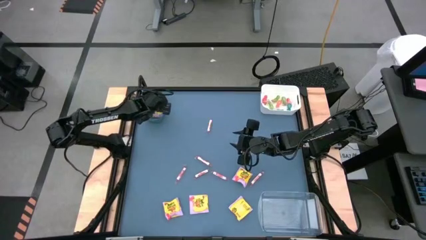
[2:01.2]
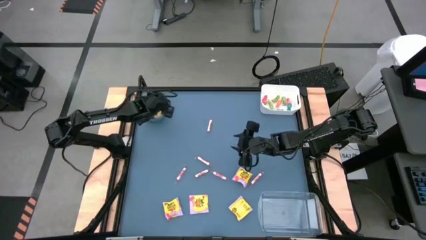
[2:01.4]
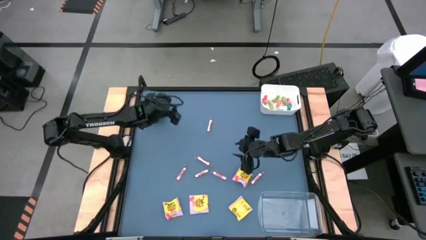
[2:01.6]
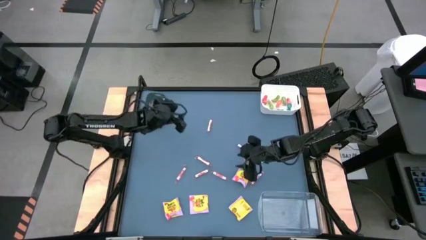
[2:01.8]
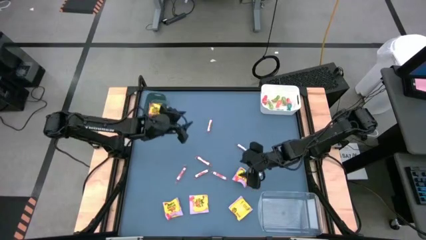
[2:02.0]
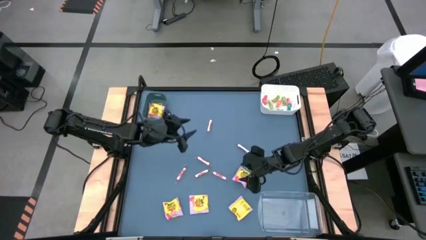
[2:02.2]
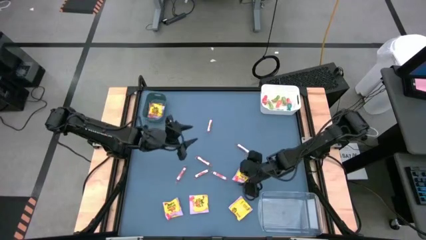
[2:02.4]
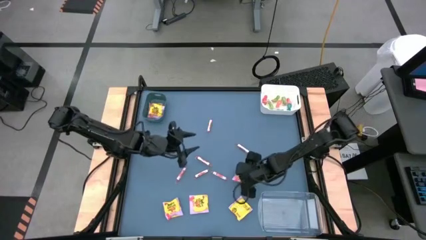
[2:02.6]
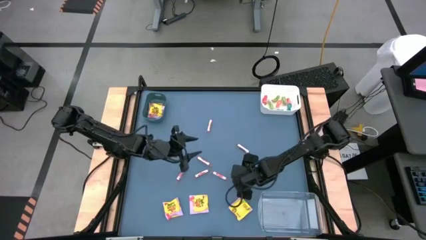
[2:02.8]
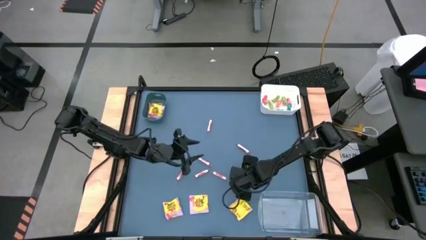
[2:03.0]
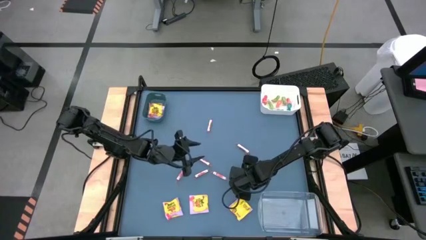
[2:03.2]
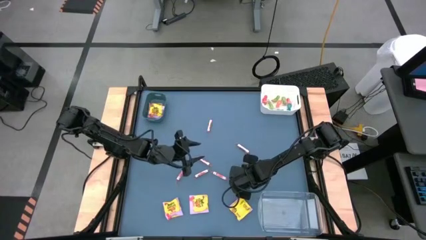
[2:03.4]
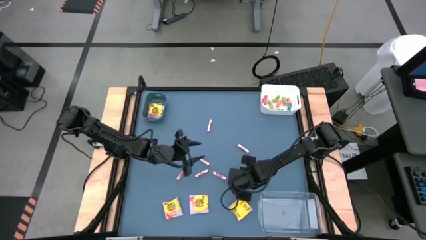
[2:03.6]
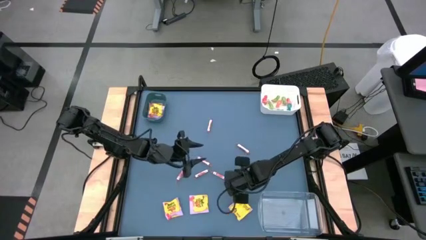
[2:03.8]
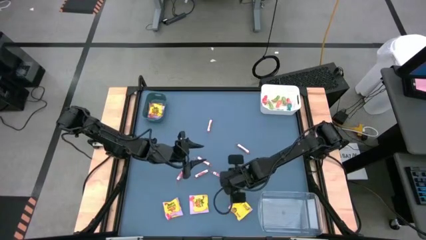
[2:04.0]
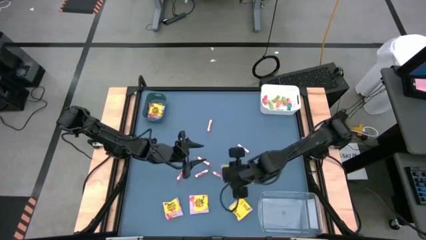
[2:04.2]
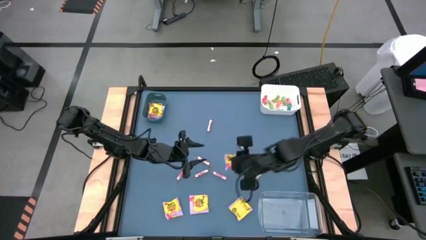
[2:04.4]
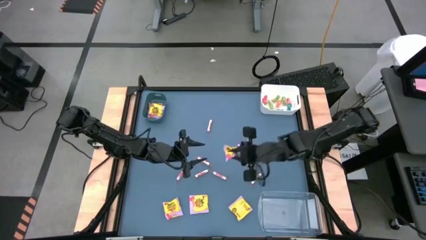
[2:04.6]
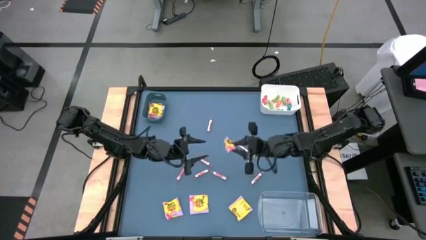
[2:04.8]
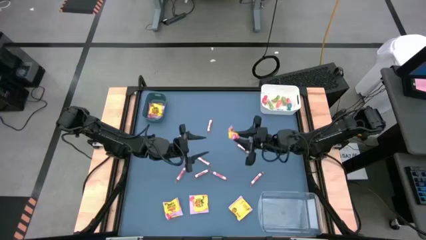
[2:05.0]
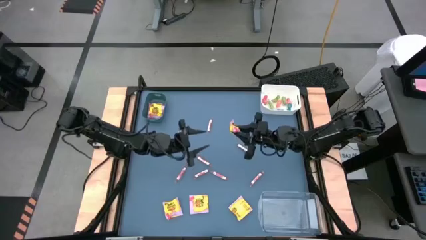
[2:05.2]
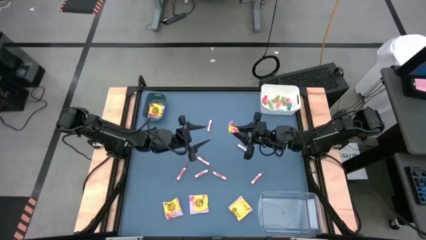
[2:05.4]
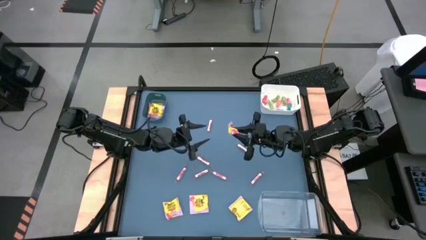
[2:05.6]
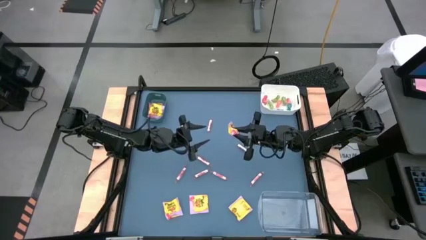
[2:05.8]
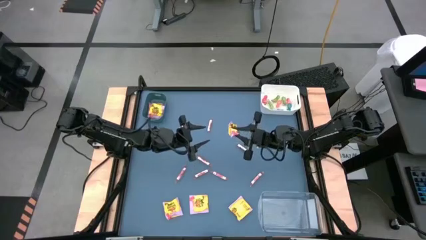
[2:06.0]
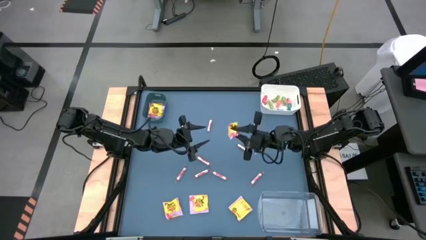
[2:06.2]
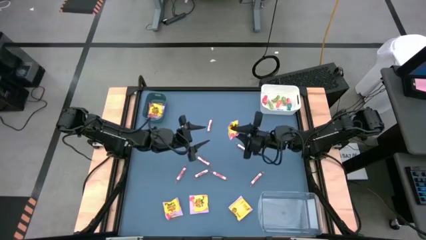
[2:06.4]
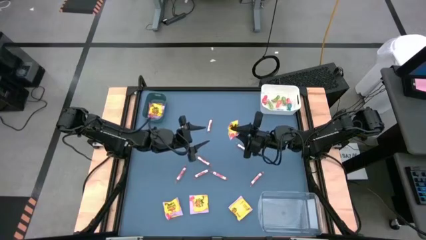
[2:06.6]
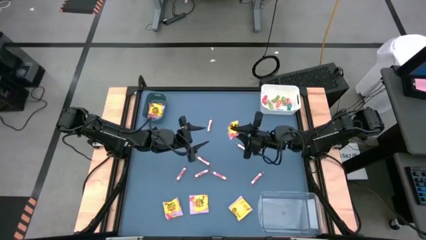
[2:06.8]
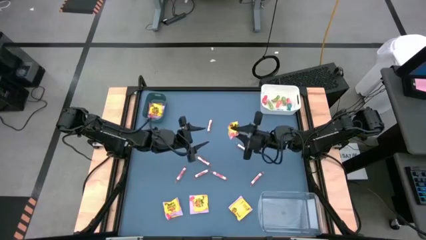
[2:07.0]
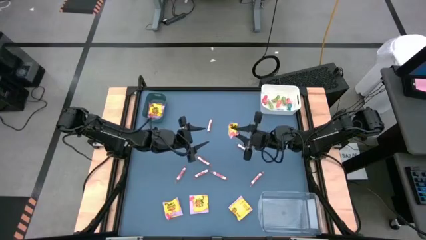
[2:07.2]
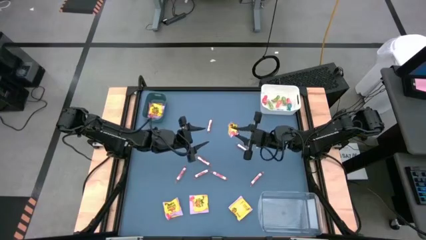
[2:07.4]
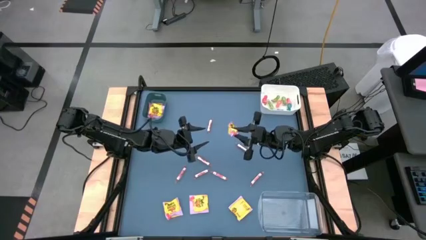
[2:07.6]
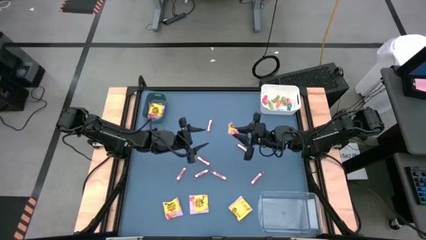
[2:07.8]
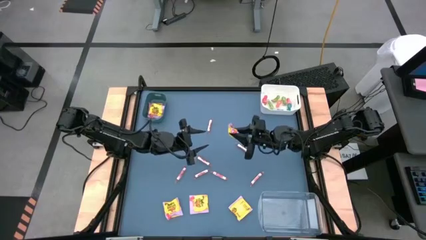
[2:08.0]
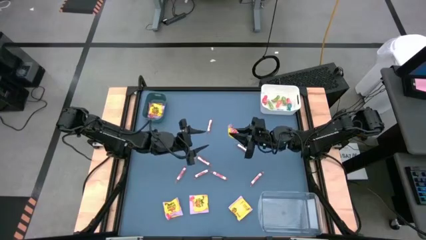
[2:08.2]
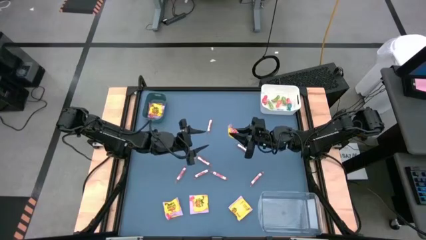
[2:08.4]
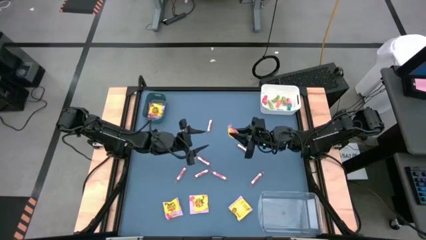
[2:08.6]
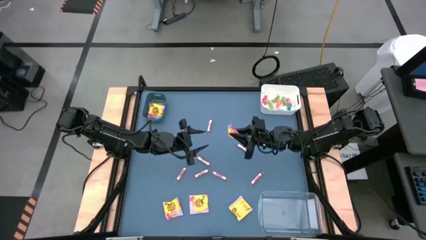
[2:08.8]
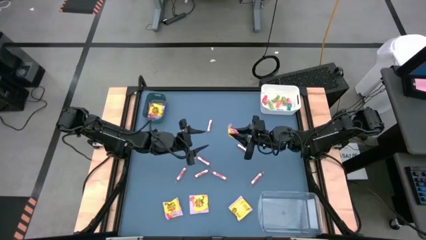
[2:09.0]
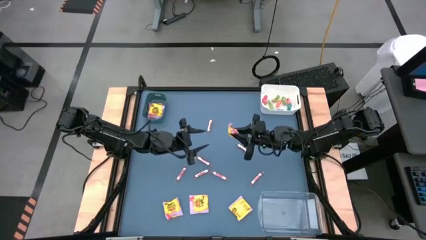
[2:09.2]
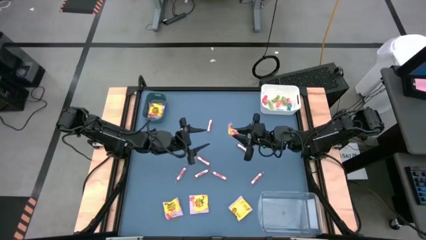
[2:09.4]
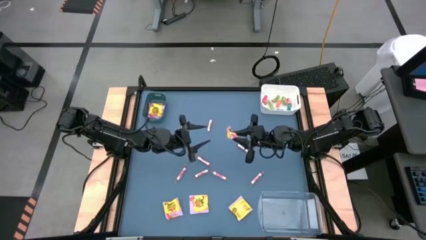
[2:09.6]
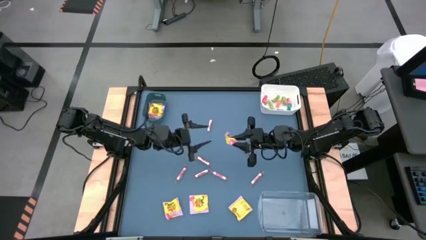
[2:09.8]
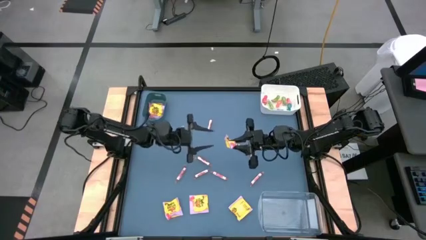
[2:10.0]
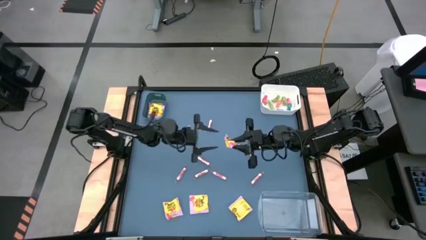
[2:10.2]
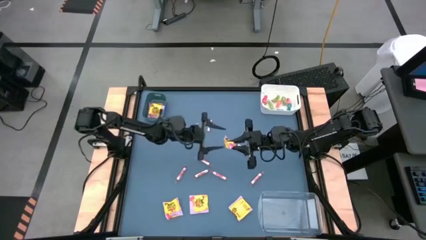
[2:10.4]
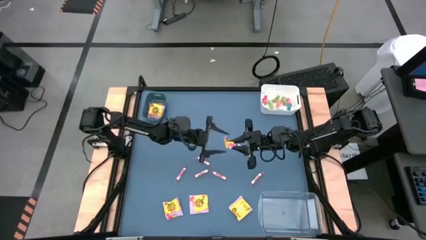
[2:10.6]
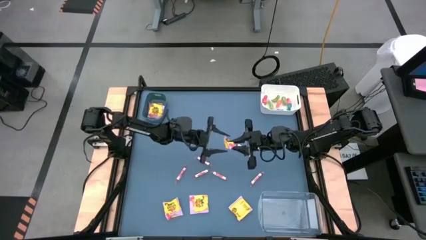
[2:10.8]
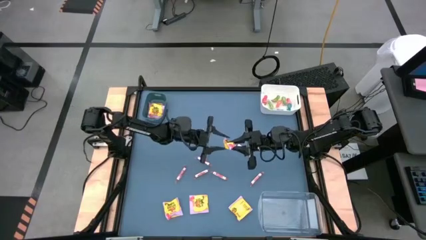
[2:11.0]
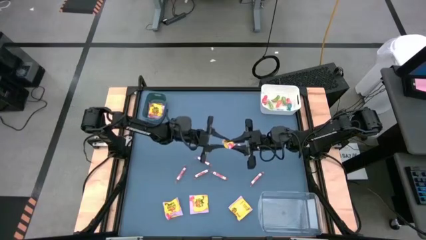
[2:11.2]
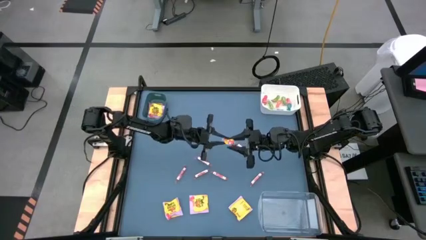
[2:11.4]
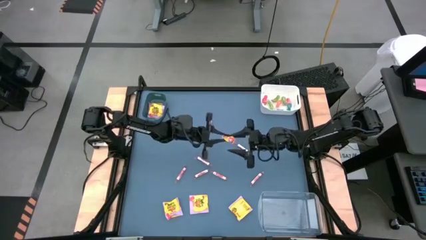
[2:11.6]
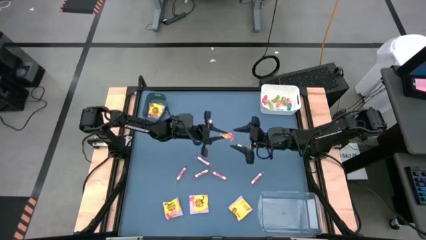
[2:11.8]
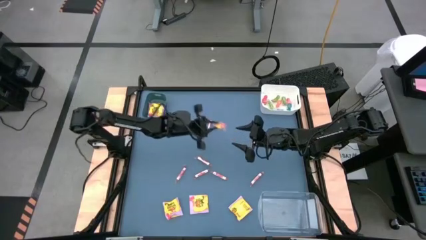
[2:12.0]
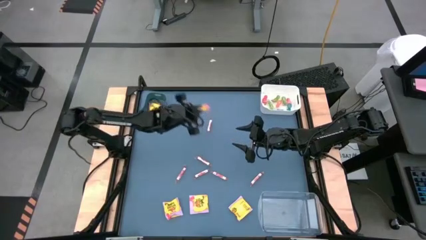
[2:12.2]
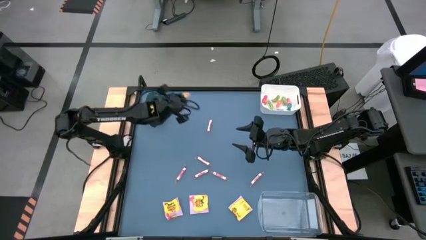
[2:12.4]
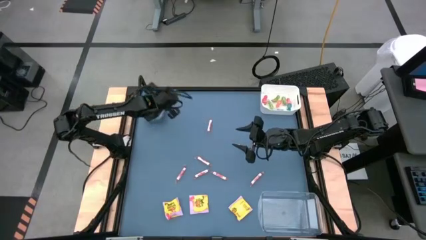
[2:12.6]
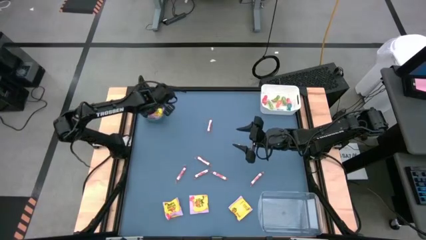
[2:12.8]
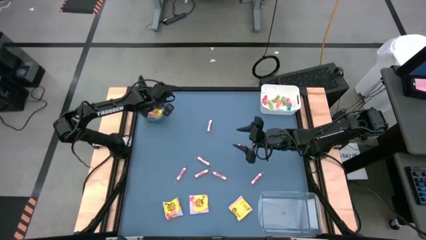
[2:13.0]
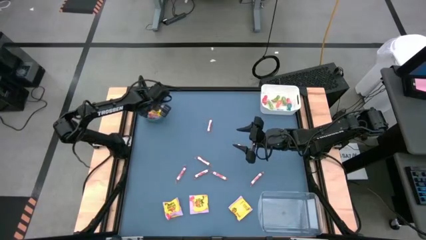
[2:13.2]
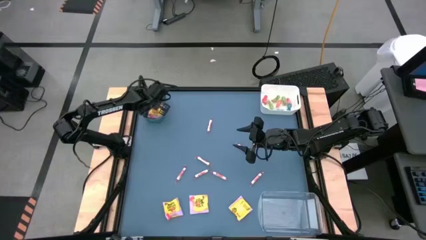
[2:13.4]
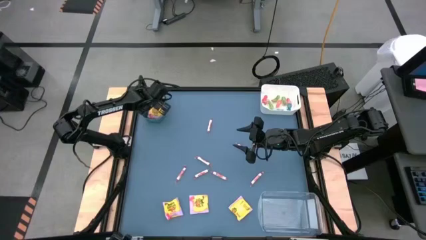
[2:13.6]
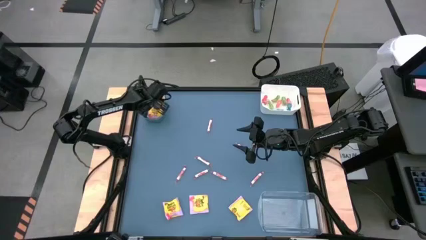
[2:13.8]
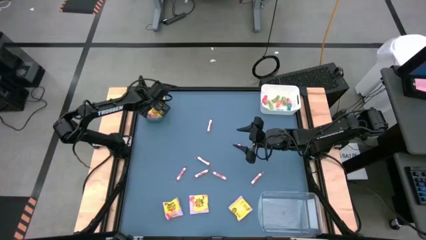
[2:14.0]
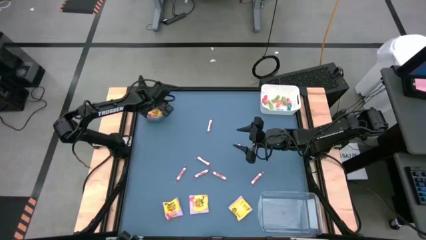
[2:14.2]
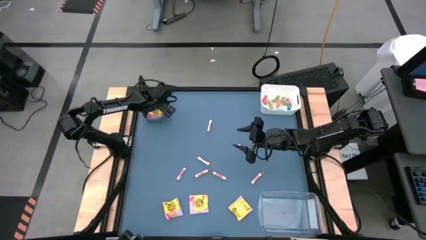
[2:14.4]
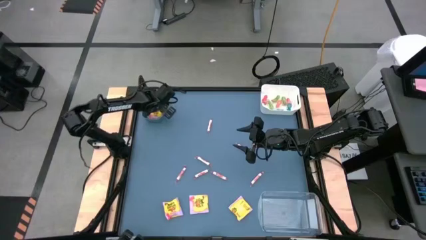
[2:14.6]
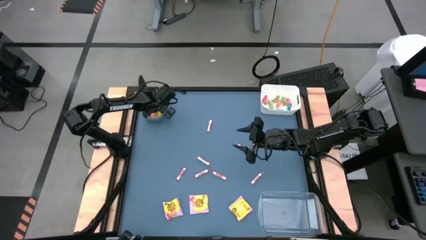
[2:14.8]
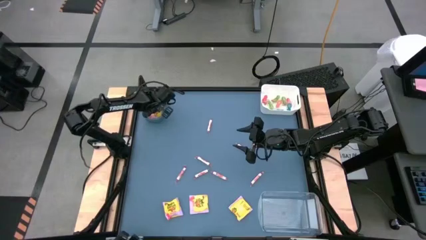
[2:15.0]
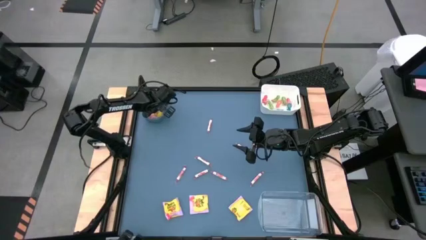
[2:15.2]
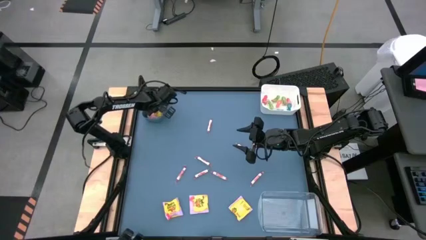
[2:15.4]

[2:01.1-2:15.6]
Task: Sort candy
Put the yellow candy pack into the blue bin
